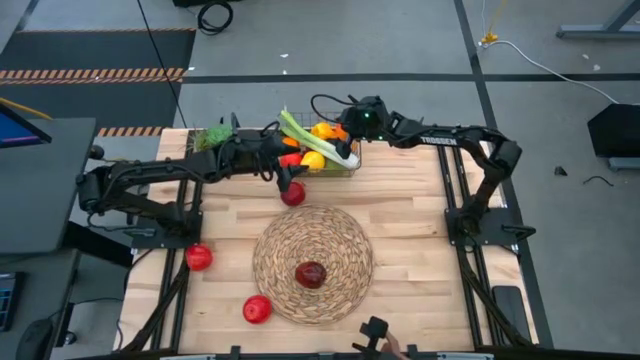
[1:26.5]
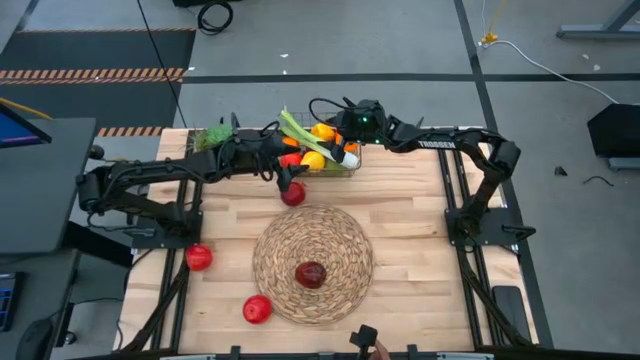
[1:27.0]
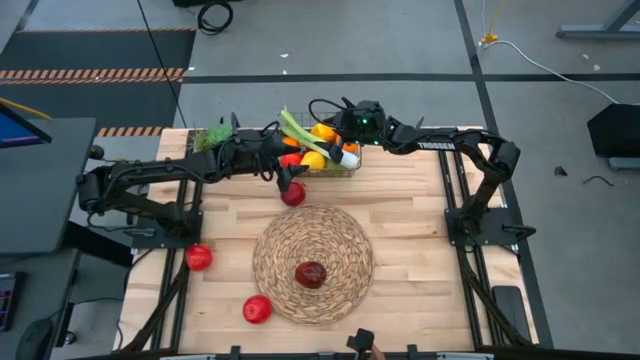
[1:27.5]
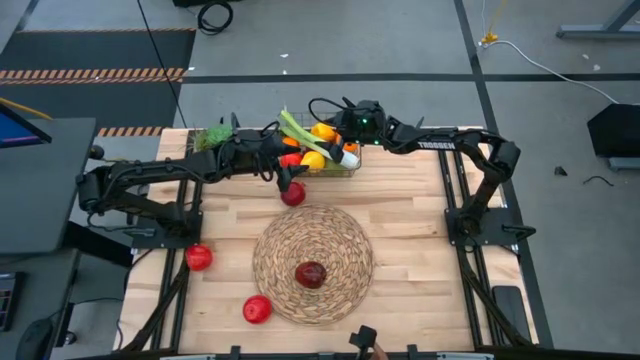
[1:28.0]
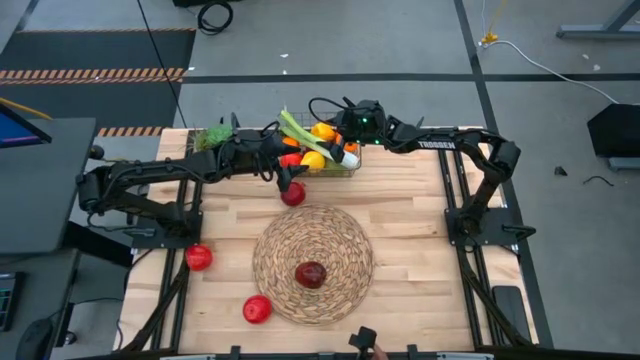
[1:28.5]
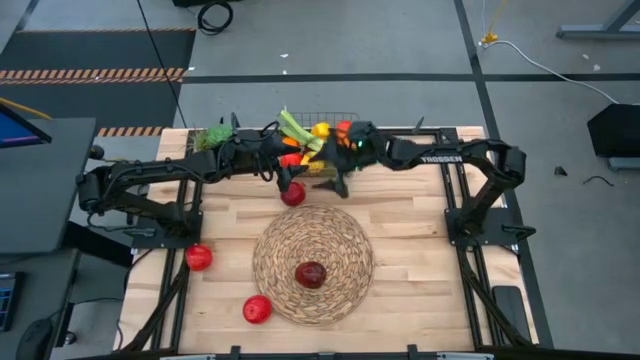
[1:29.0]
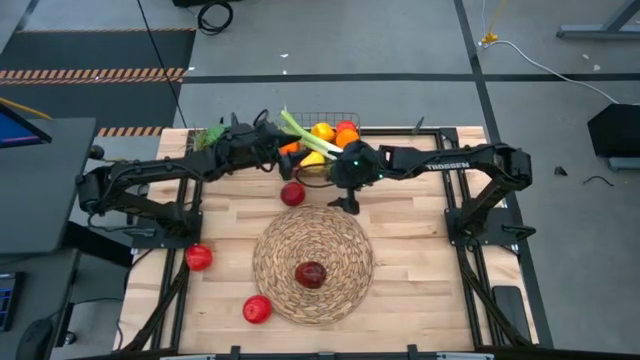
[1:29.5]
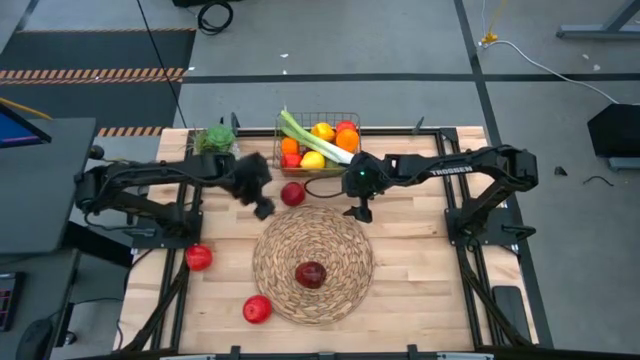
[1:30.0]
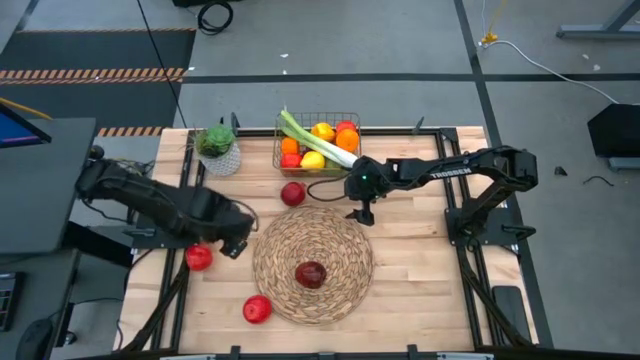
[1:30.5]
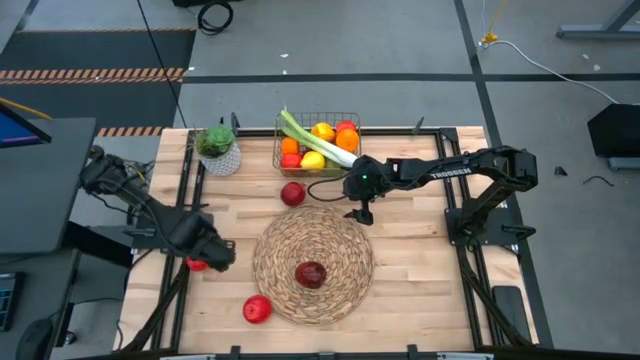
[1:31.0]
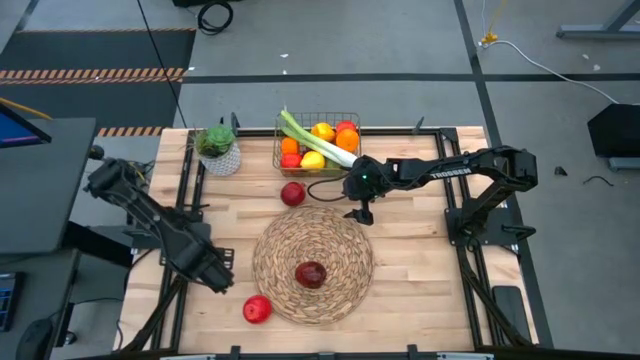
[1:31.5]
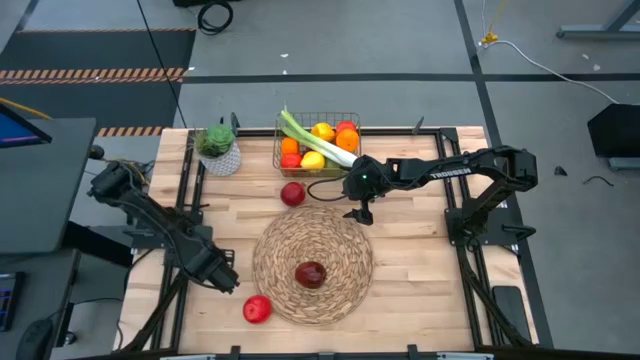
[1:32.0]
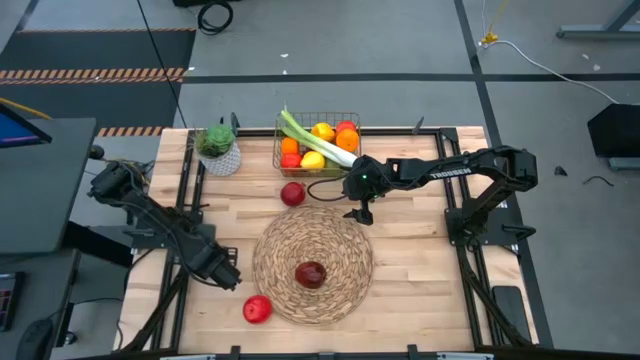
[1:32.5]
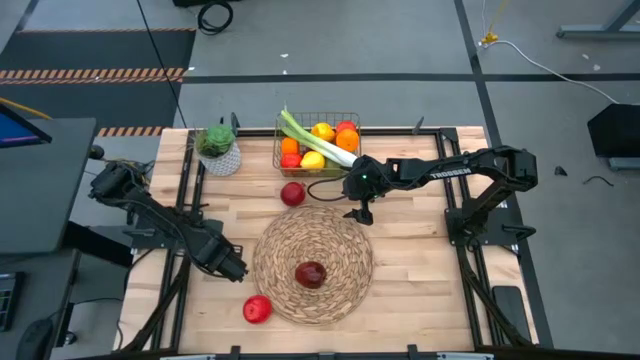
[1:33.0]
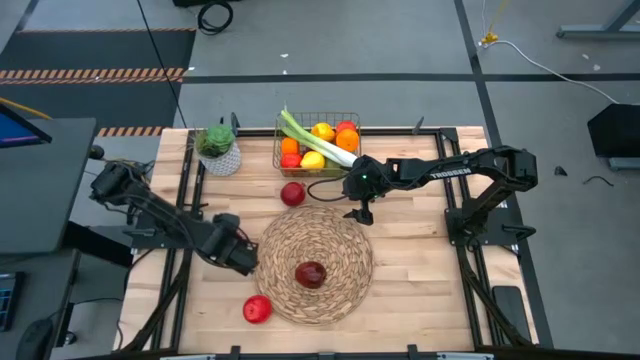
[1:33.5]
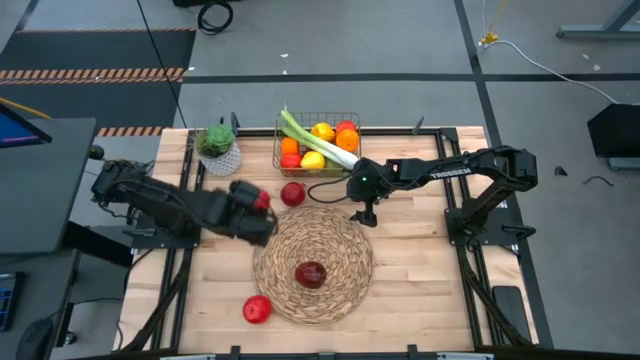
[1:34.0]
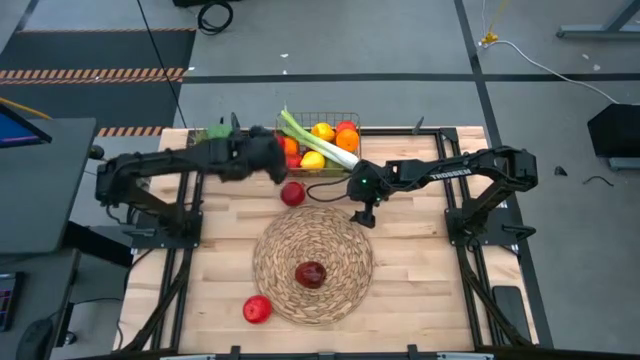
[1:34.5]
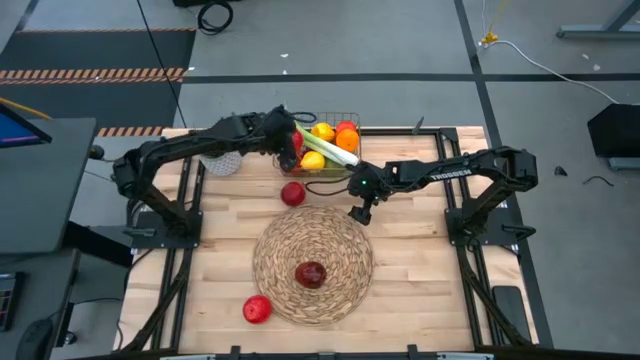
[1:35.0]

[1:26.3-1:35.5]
Task: Build produce basket
Put the apple into the wire basket

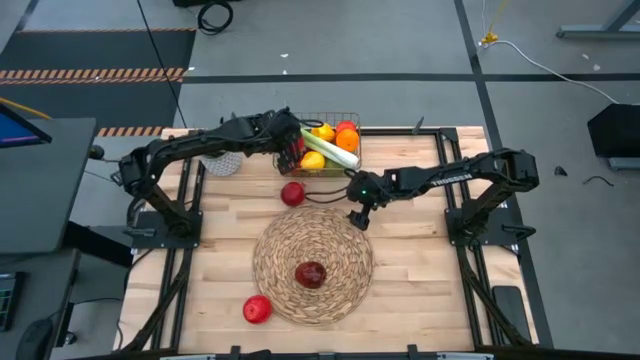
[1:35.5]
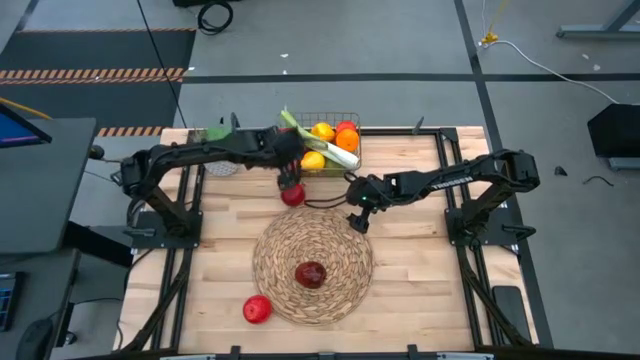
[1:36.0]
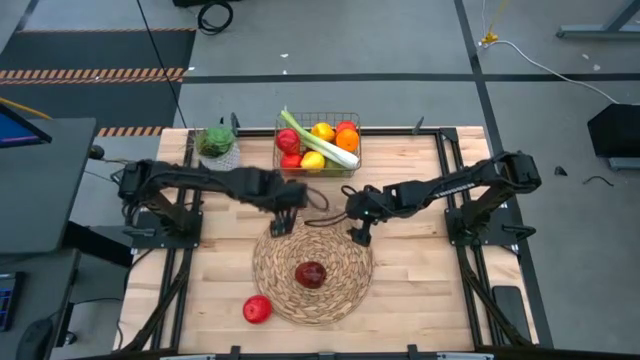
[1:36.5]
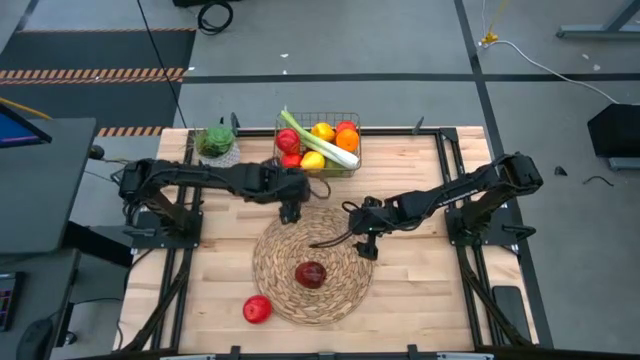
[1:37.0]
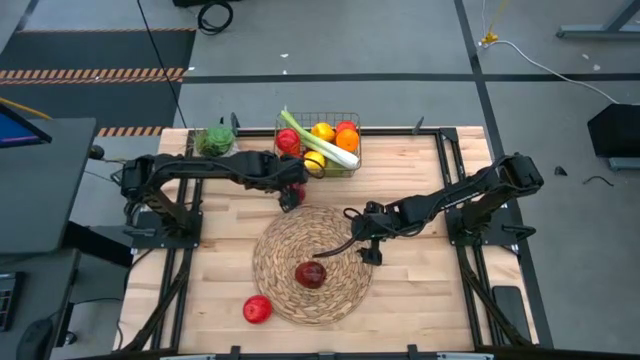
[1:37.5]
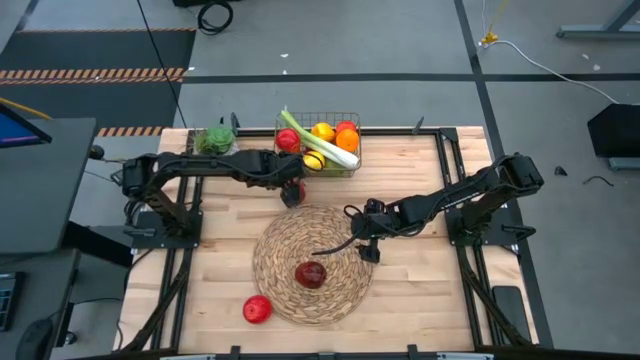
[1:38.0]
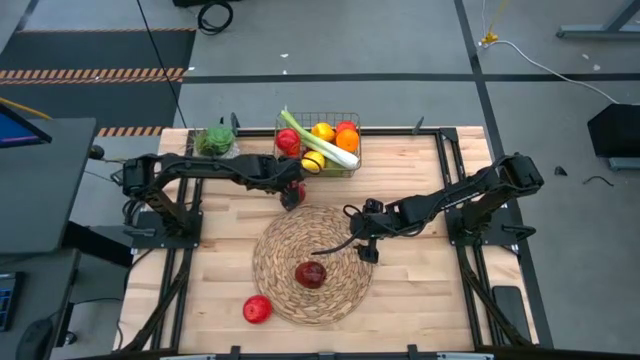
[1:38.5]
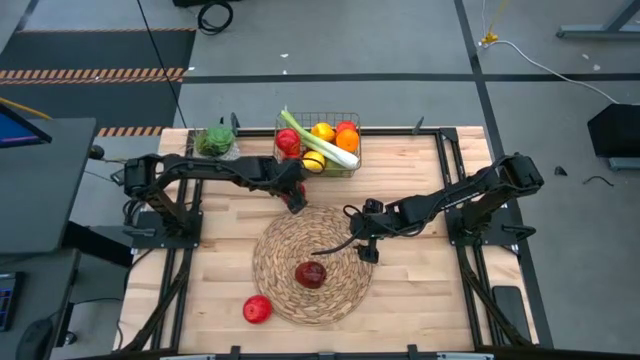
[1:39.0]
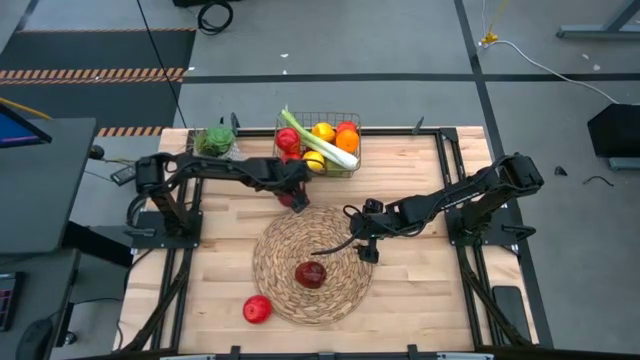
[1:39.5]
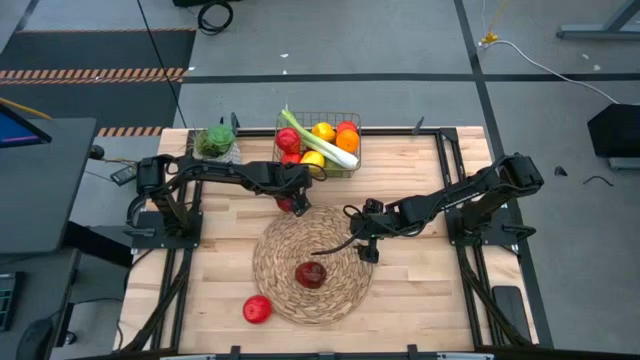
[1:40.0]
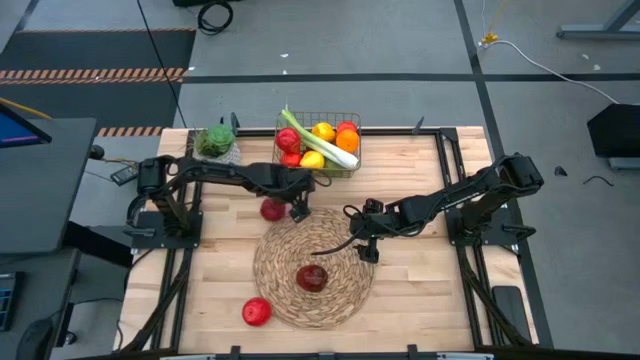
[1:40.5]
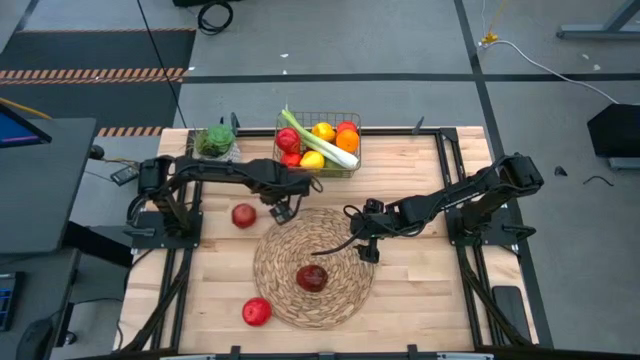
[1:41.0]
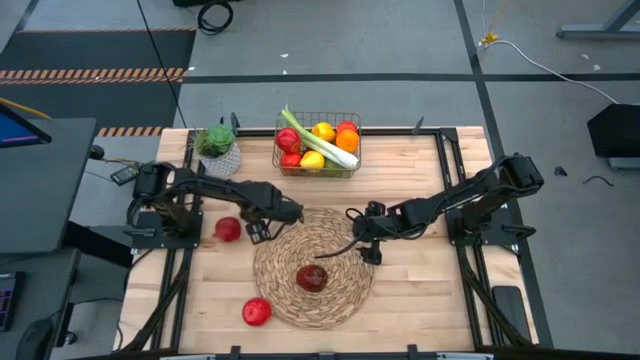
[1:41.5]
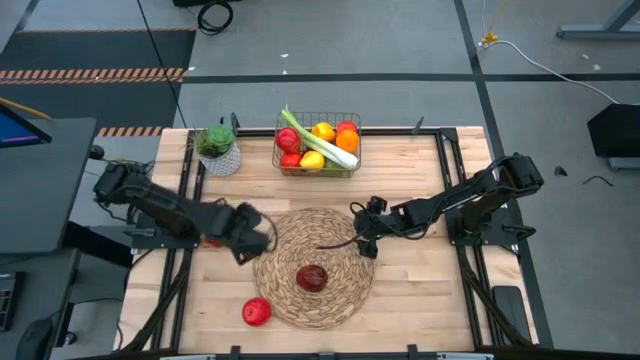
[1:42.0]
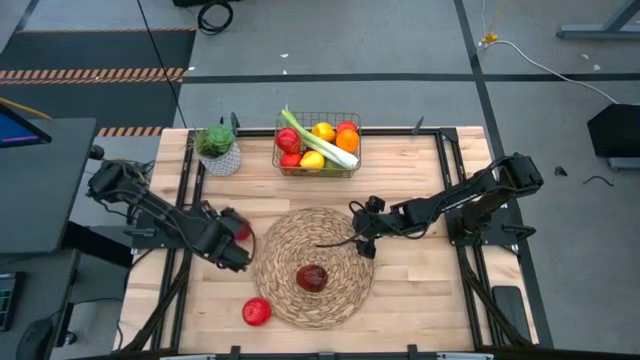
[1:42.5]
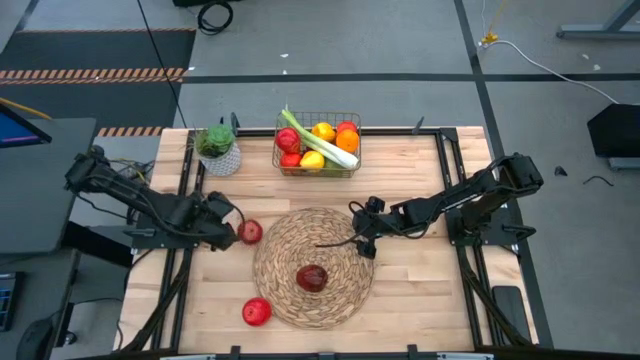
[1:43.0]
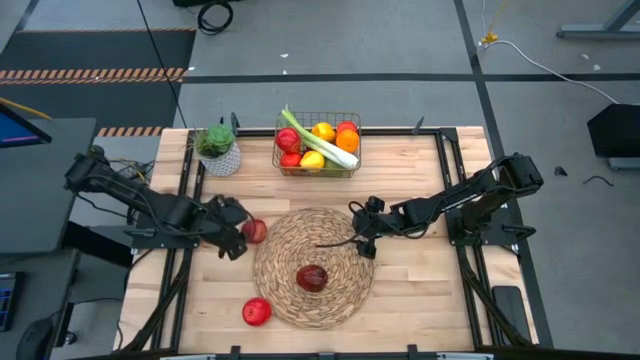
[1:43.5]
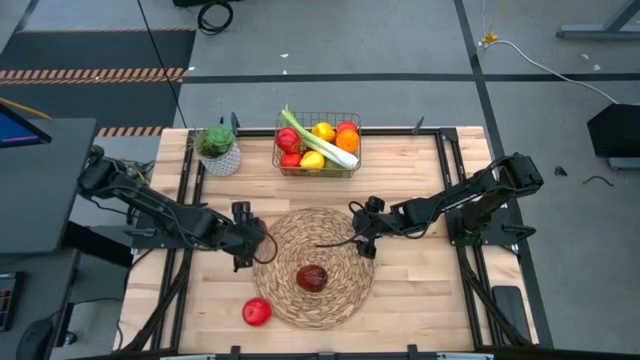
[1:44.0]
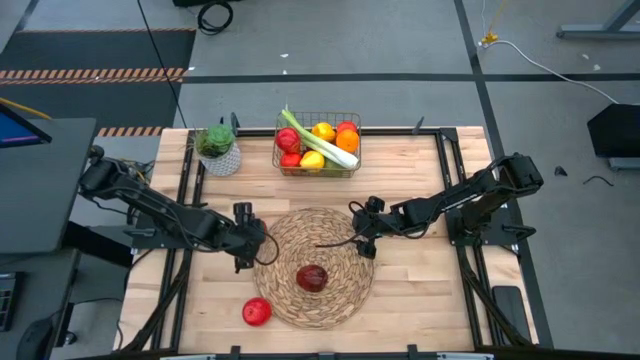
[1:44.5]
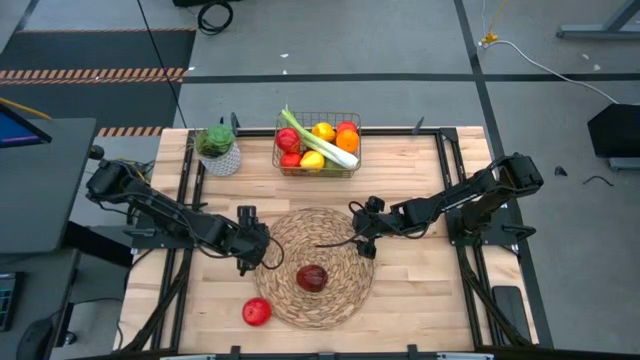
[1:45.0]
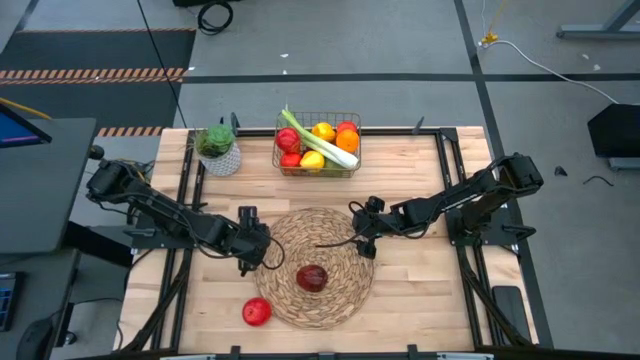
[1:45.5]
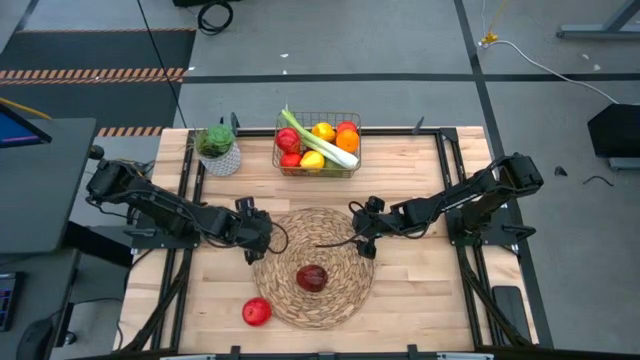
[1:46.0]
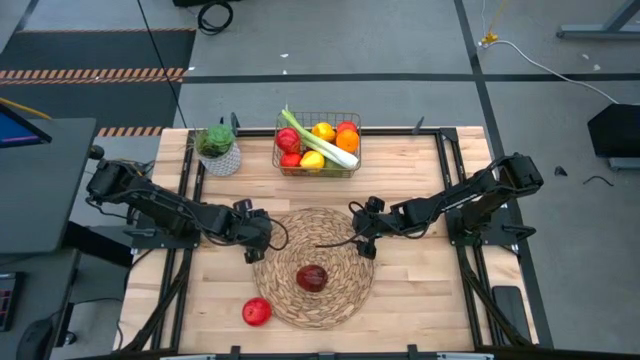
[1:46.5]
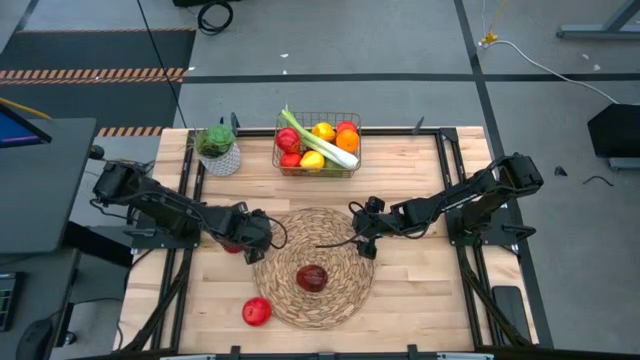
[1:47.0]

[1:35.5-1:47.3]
Put the pomegranate into the wire basket
